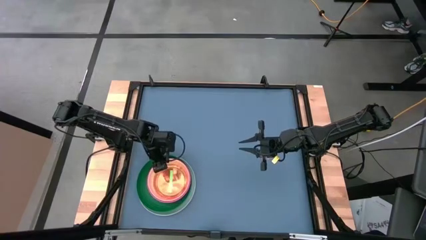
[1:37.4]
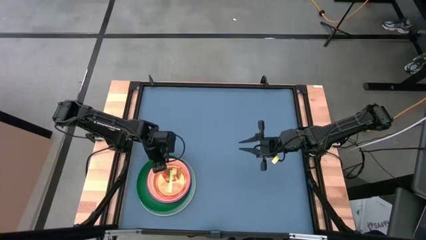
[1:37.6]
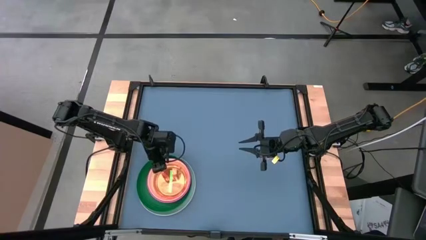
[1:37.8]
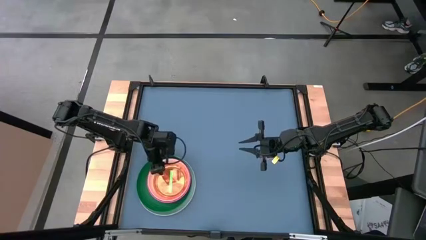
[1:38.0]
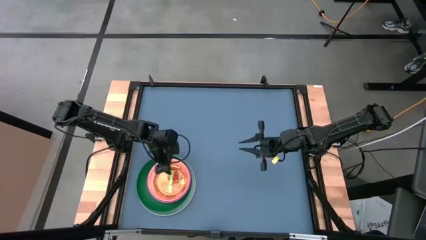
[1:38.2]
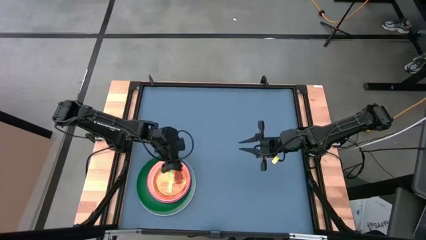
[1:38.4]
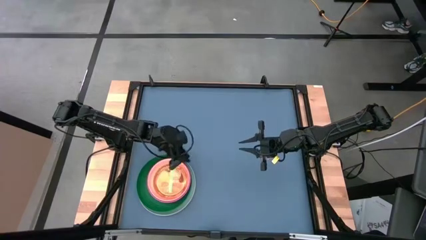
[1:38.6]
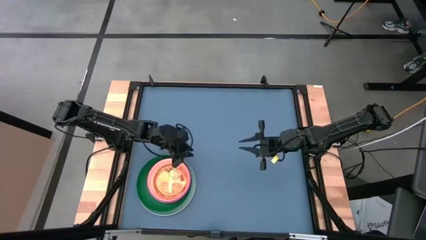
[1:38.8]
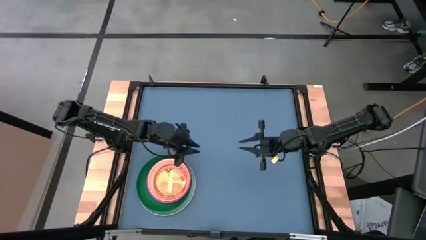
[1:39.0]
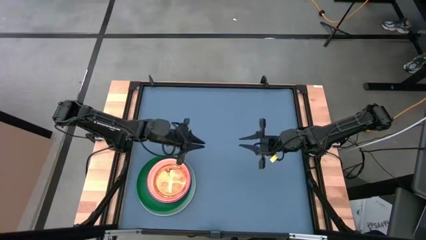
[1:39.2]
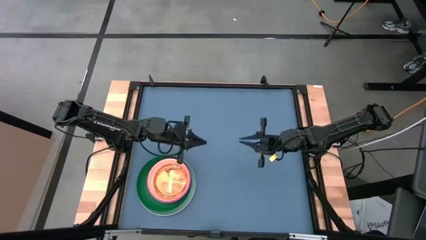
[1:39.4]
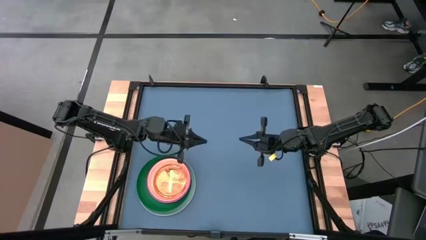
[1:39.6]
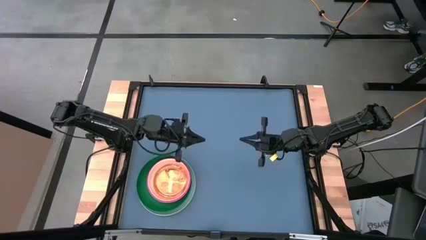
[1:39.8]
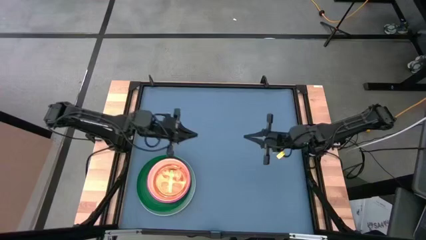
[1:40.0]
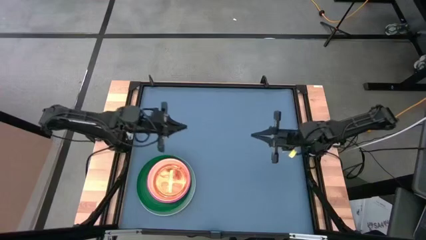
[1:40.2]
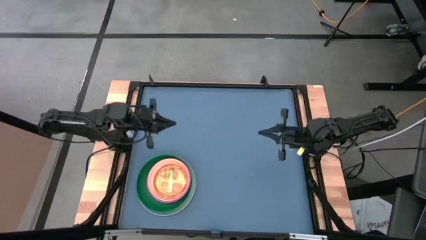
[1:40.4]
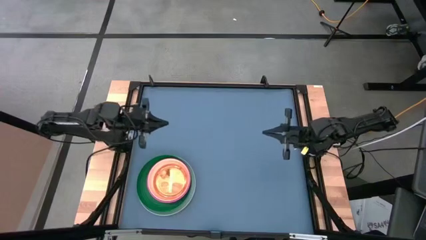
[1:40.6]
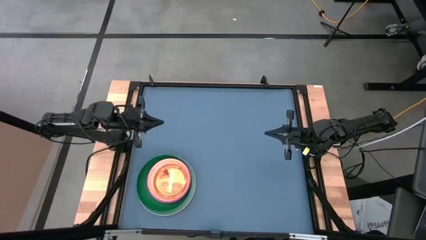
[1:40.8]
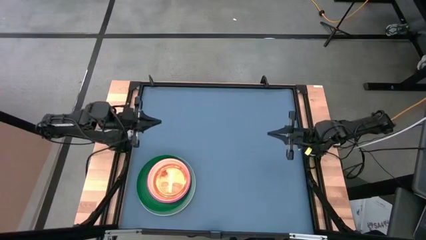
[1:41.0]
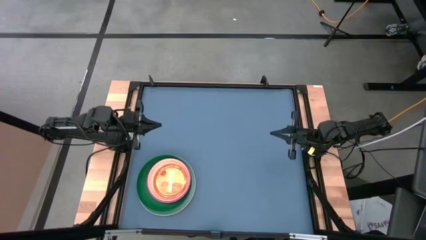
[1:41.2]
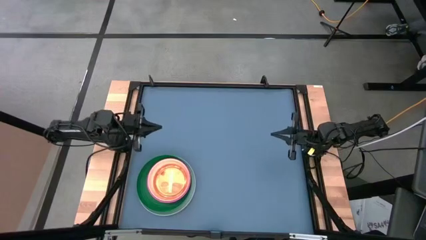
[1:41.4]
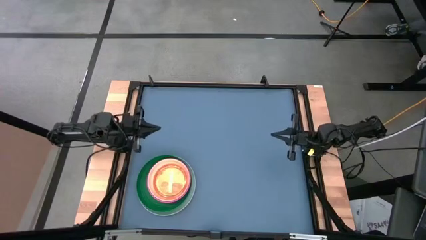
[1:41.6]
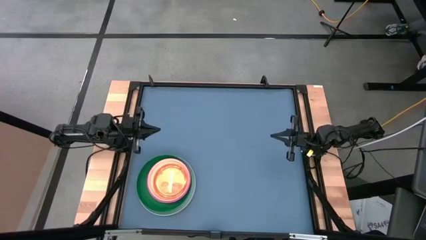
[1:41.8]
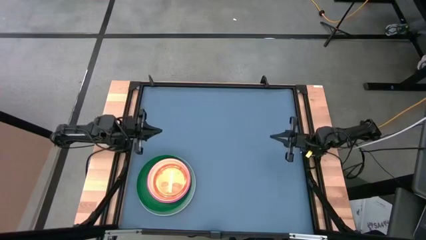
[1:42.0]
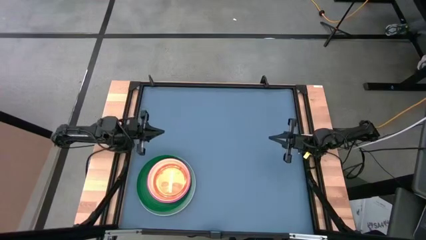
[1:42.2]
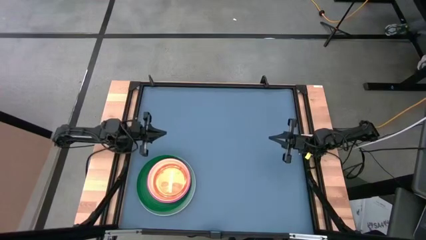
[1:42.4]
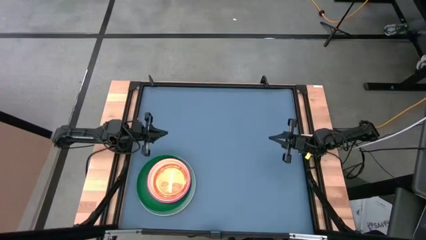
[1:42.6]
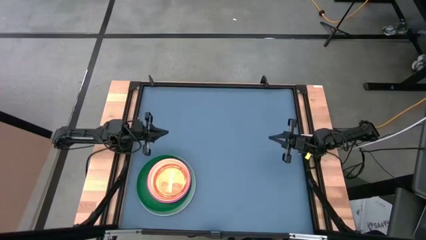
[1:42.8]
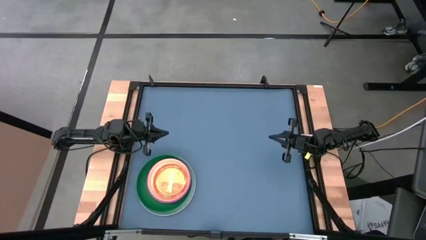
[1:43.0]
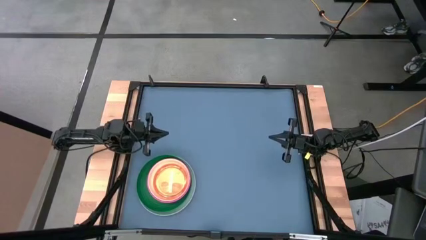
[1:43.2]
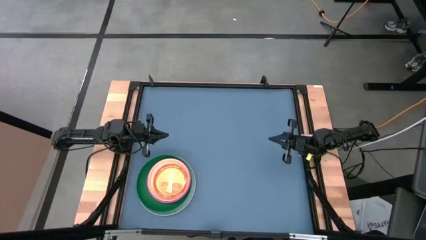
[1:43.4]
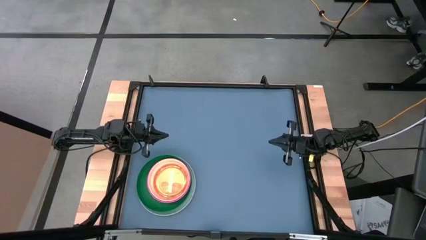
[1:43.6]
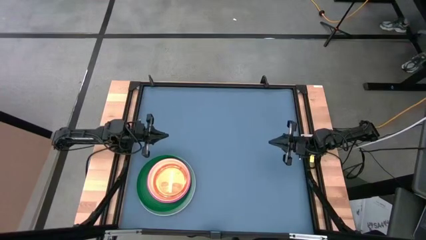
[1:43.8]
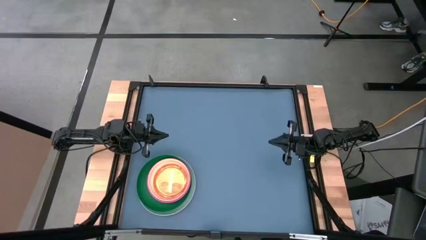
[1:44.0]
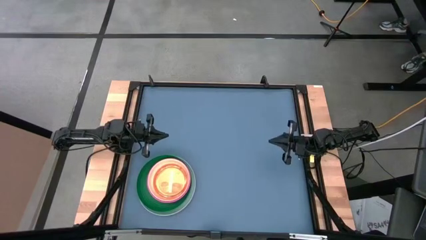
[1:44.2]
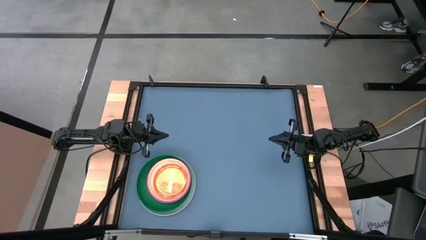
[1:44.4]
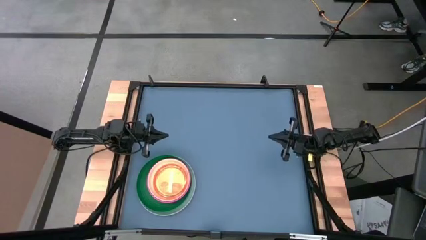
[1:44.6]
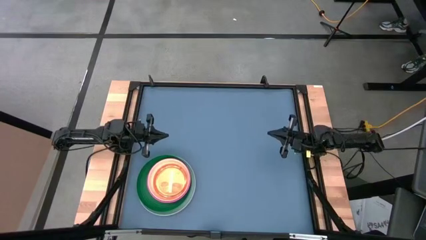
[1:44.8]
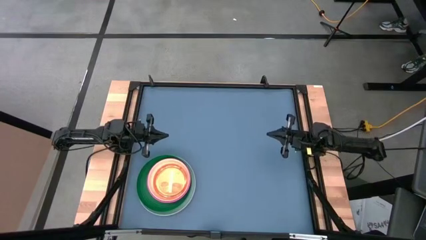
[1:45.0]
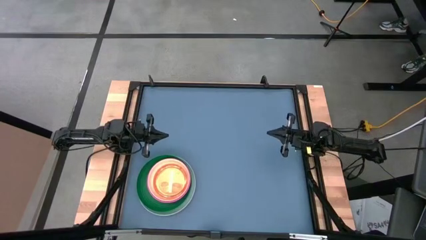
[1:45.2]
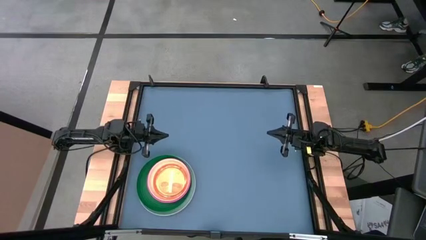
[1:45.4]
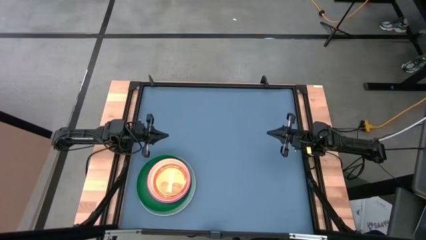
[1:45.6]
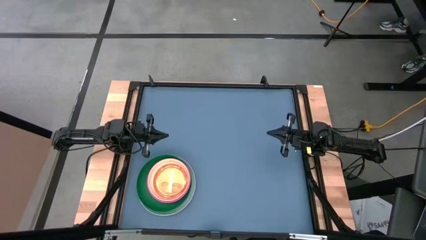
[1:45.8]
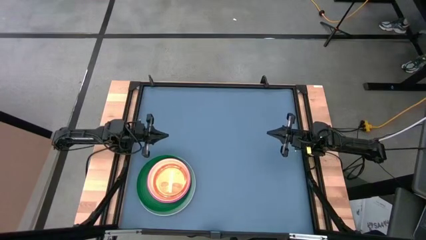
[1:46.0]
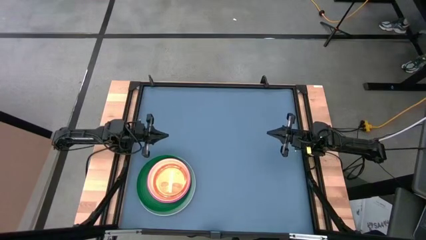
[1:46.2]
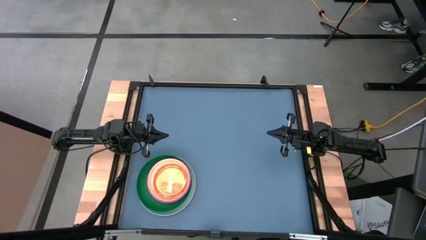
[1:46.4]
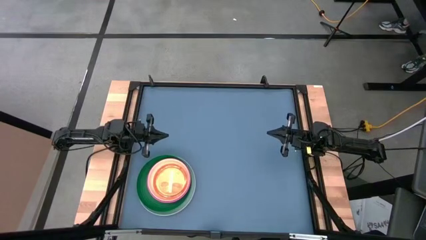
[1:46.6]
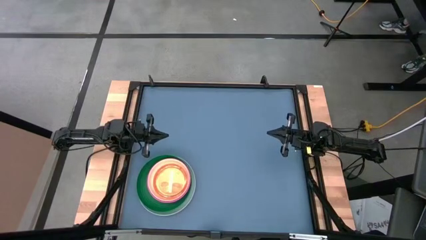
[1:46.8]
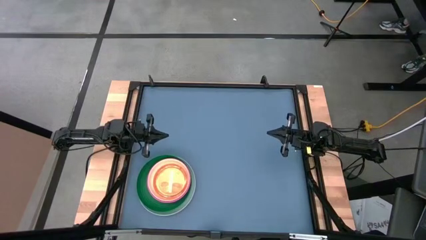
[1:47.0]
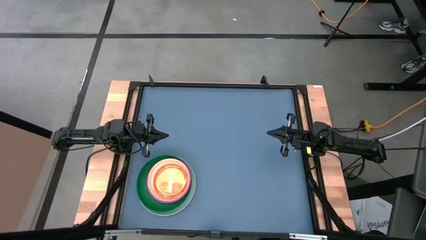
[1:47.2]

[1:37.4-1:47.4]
Task: Stack plastic plates
Return to Home Position

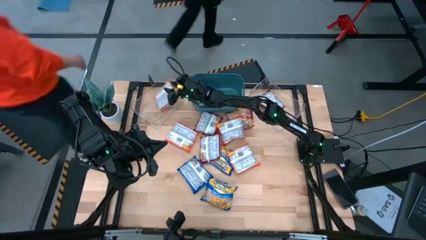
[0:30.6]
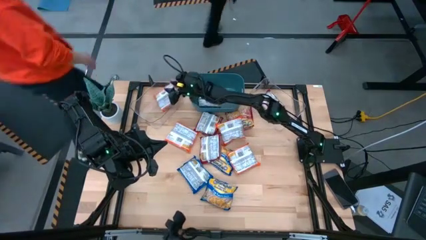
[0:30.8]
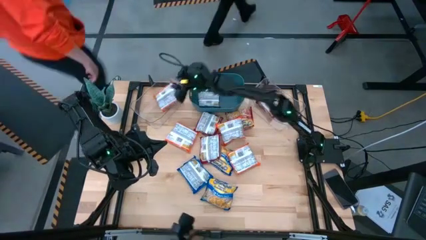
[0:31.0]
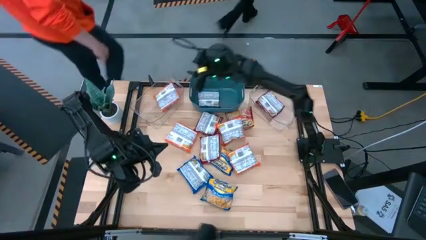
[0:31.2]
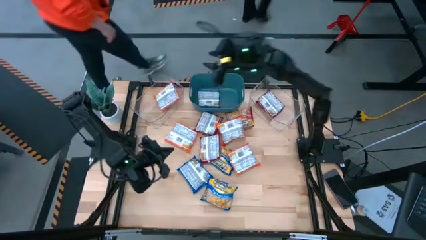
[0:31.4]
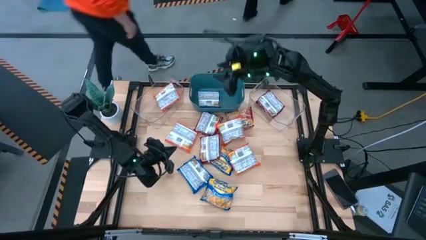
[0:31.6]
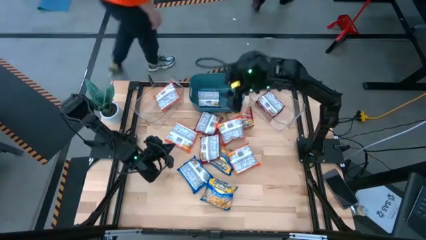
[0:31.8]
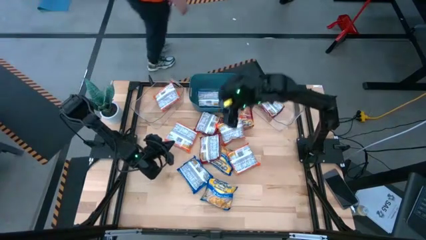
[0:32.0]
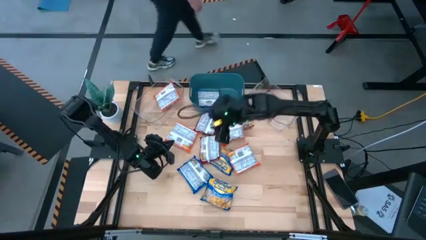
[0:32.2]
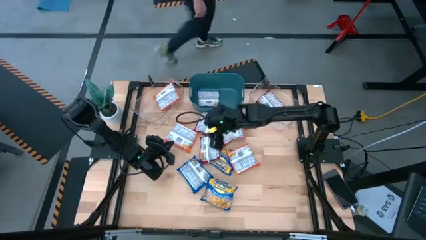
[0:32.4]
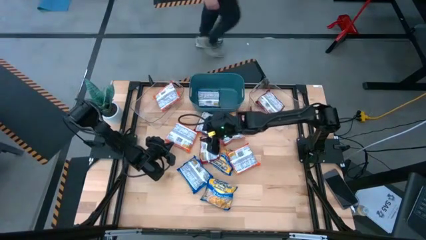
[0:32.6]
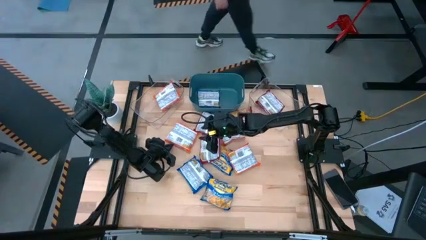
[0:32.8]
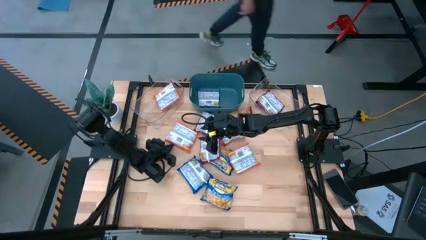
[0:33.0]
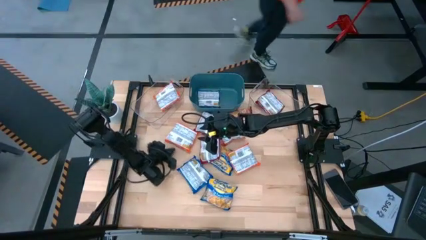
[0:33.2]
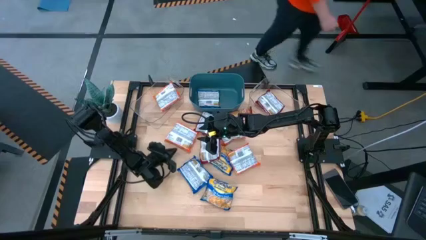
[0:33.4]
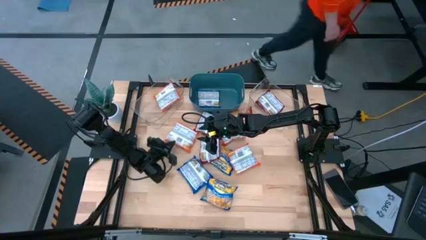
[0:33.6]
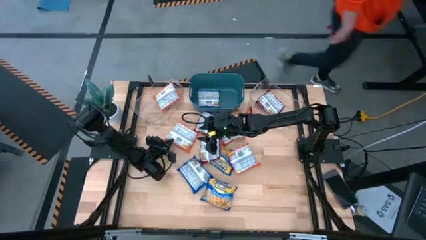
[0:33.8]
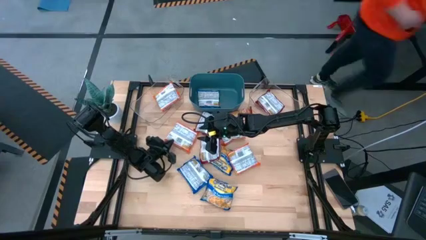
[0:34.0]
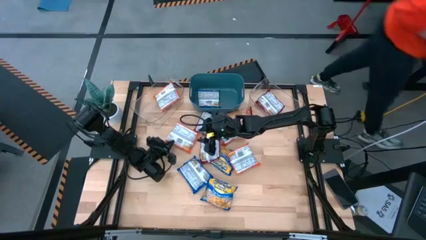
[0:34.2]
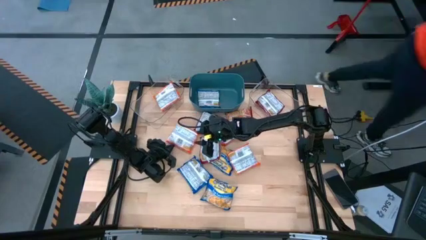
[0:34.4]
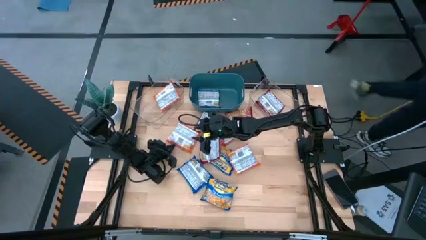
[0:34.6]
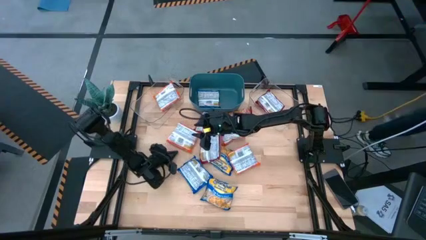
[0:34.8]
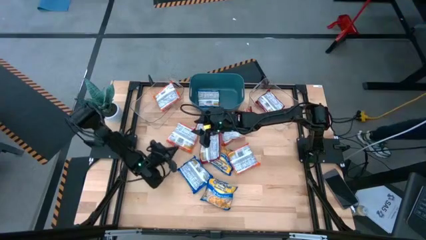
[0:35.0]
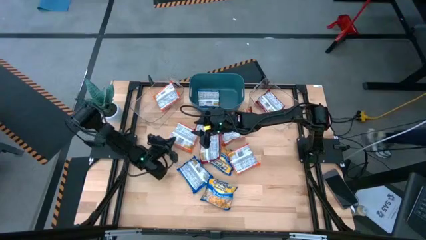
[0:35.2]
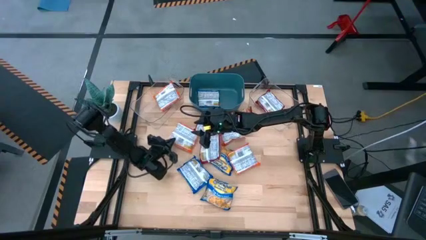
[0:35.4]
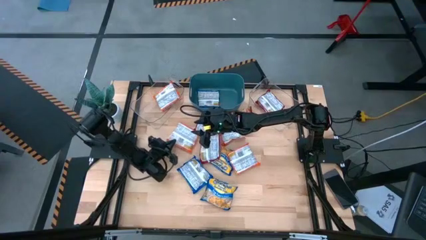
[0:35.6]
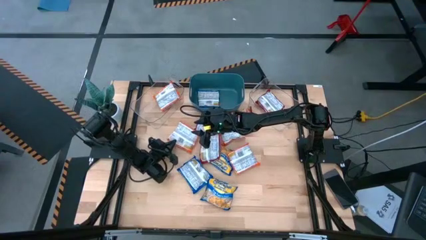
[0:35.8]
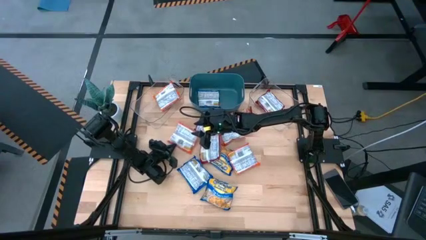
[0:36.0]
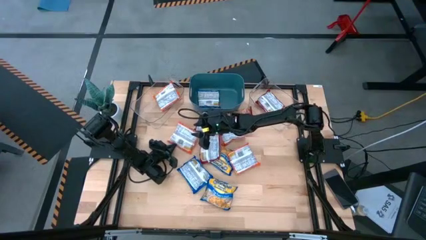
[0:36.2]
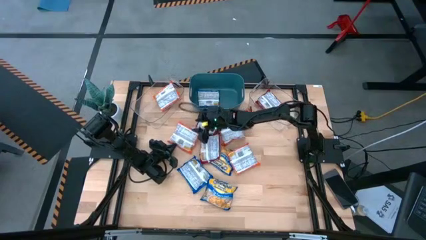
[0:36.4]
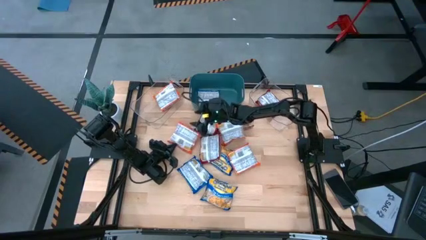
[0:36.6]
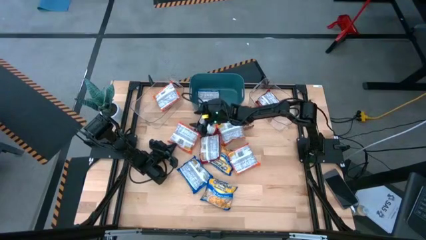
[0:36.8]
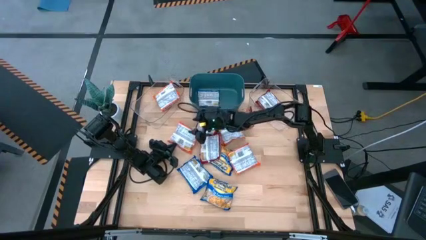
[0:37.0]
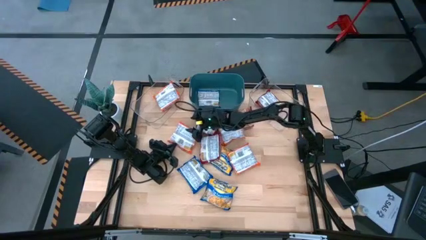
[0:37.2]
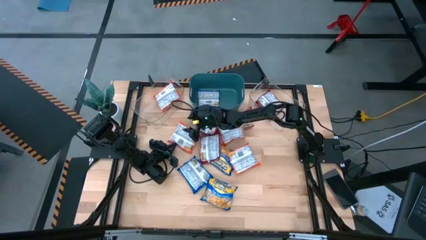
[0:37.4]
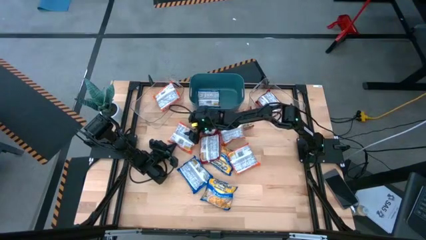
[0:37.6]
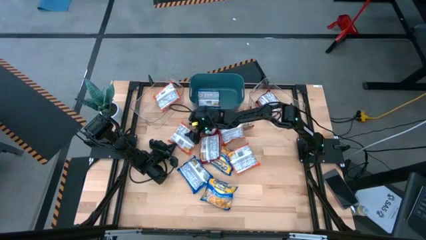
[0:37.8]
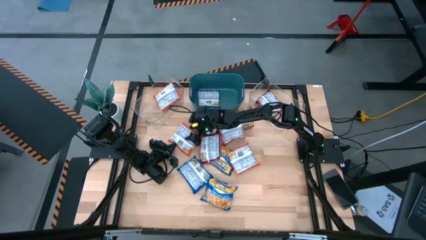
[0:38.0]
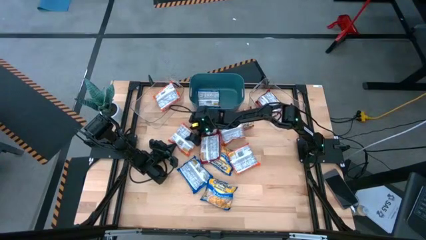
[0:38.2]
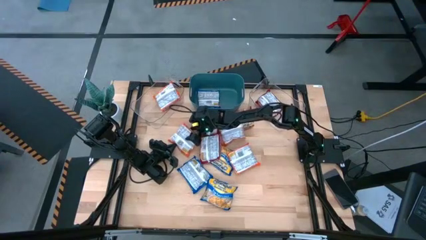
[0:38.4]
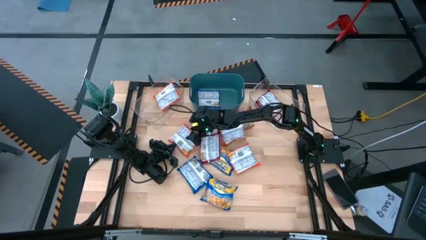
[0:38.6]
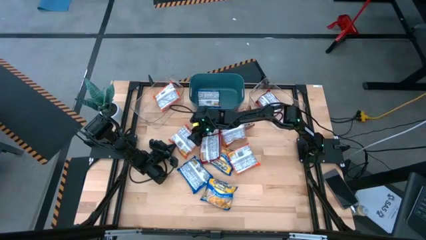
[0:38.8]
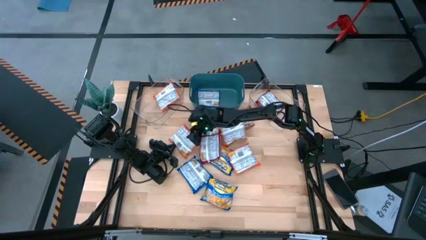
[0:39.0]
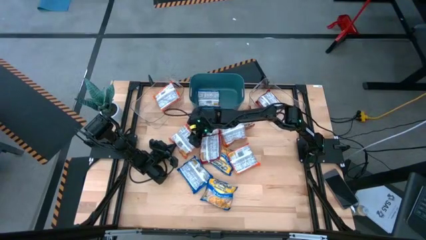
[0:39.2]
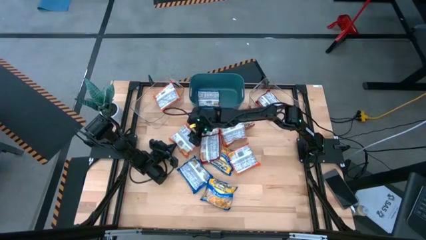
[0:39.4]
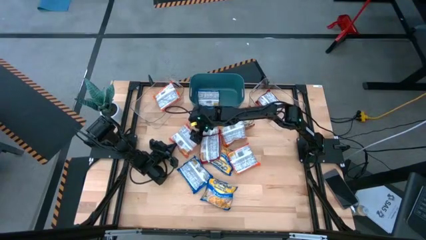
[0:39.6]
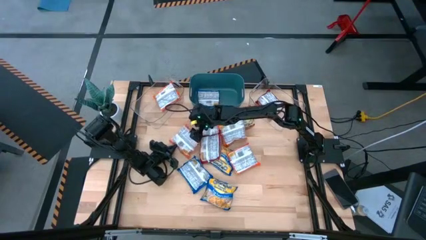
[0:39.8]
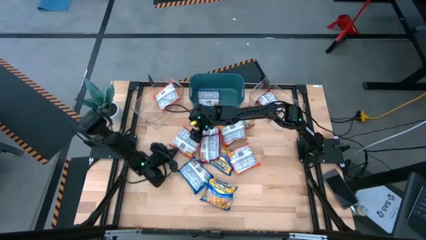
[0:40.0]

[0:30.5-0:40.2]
Task: Sort Maruchan noodles
Put the orange noodle pack into the left transparent bin
